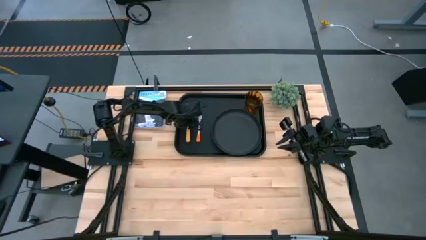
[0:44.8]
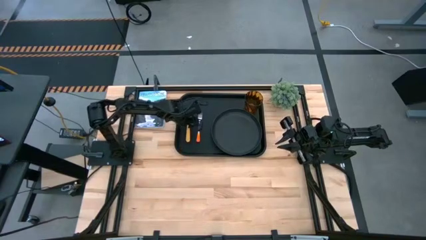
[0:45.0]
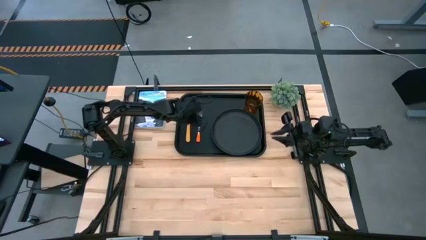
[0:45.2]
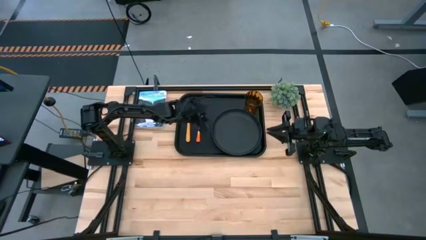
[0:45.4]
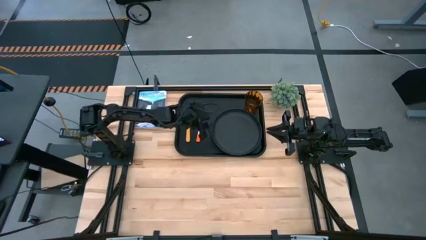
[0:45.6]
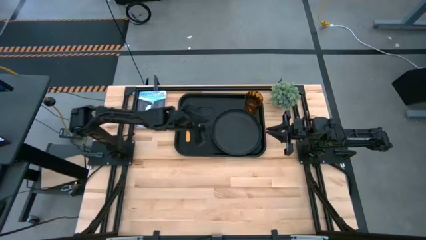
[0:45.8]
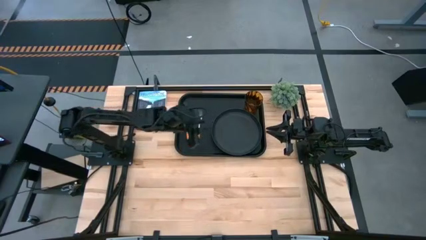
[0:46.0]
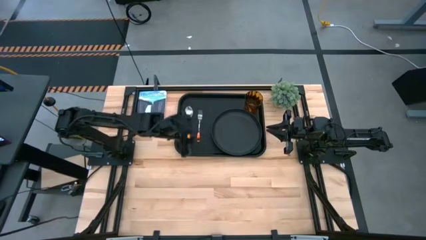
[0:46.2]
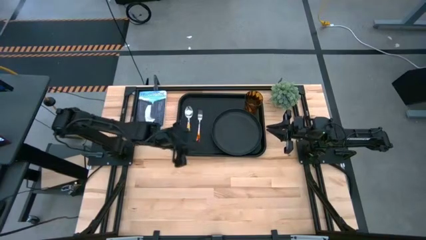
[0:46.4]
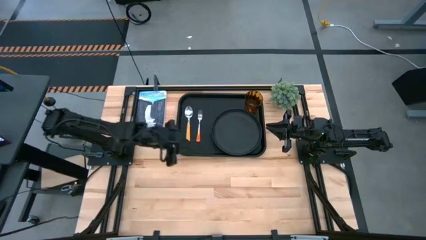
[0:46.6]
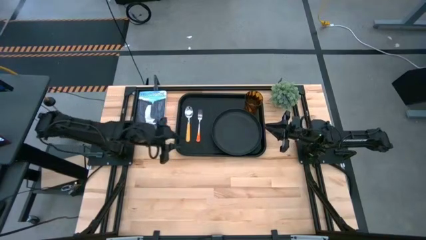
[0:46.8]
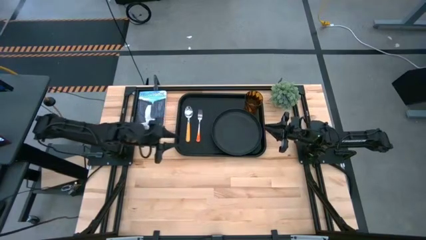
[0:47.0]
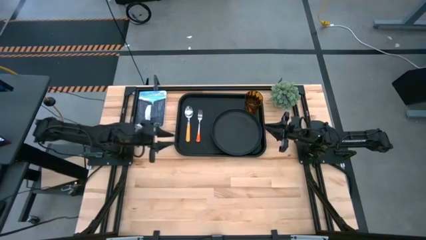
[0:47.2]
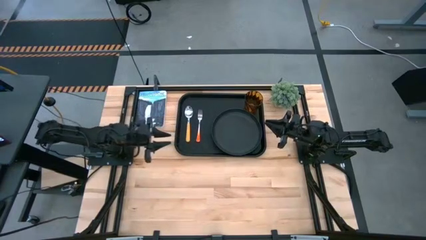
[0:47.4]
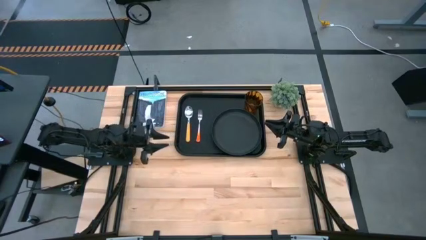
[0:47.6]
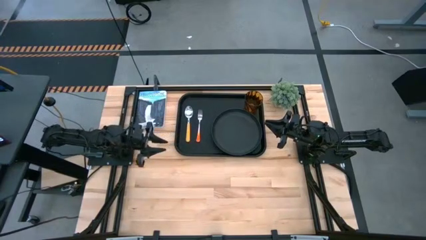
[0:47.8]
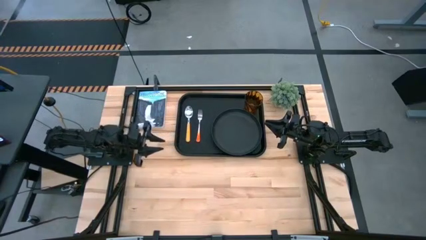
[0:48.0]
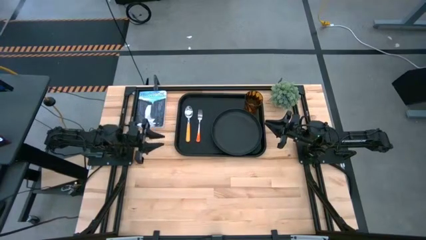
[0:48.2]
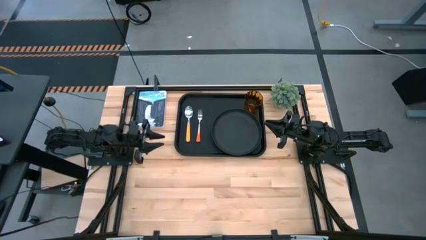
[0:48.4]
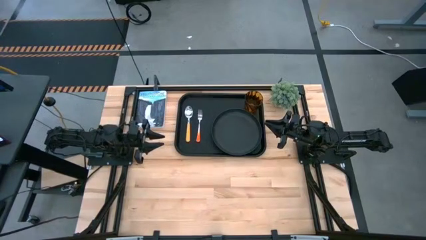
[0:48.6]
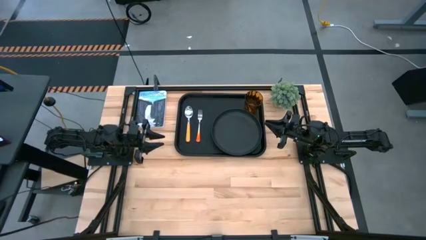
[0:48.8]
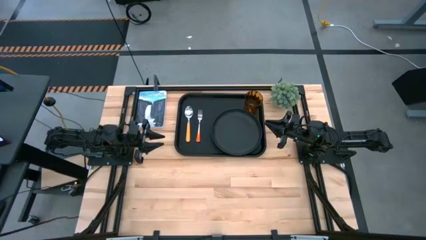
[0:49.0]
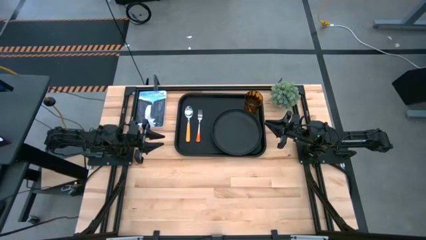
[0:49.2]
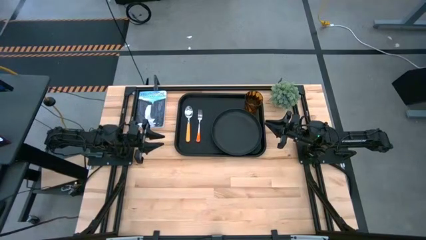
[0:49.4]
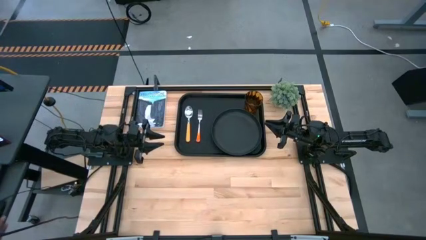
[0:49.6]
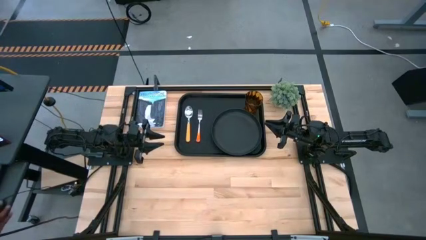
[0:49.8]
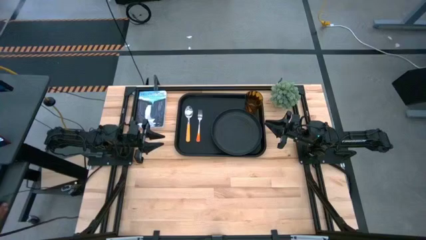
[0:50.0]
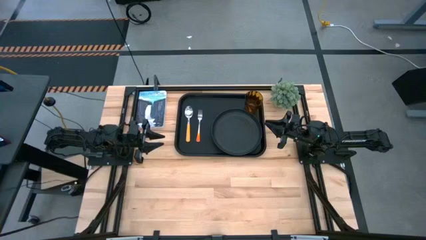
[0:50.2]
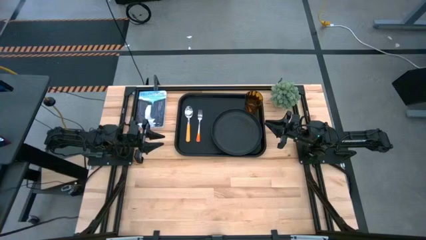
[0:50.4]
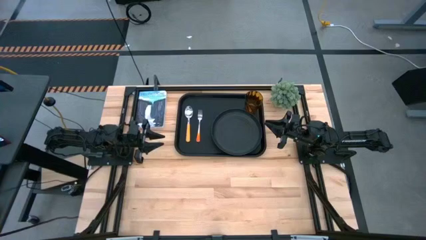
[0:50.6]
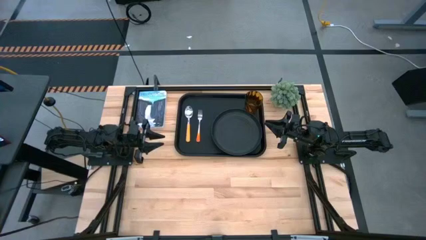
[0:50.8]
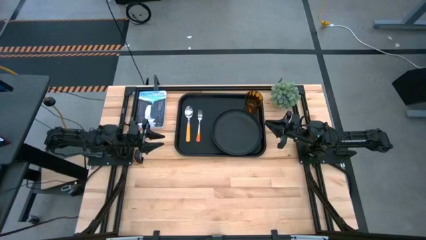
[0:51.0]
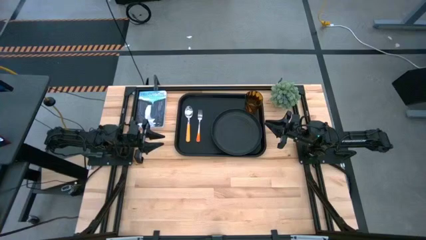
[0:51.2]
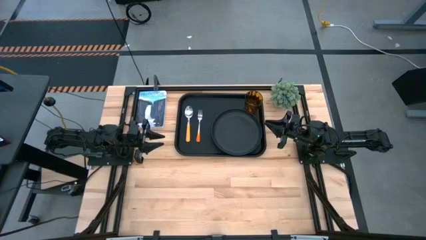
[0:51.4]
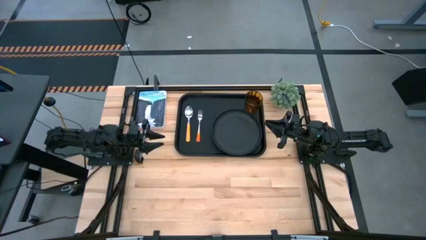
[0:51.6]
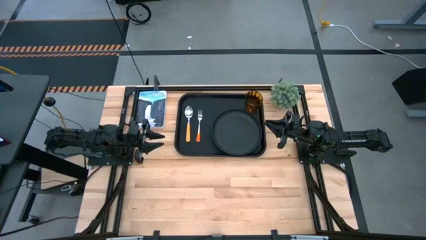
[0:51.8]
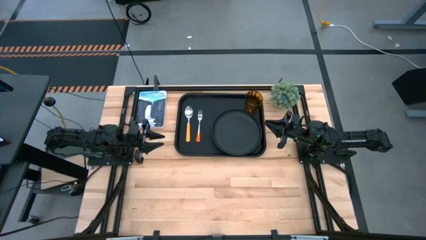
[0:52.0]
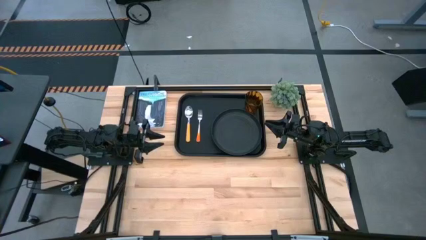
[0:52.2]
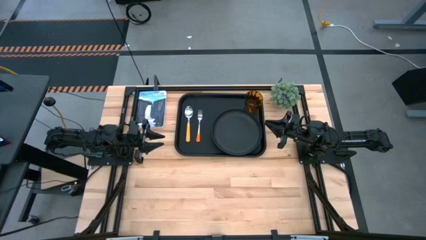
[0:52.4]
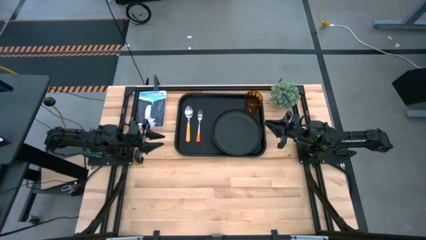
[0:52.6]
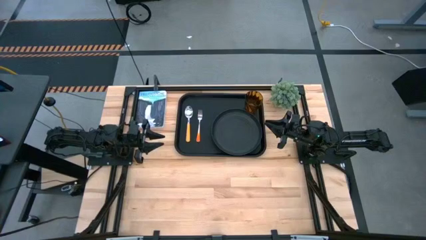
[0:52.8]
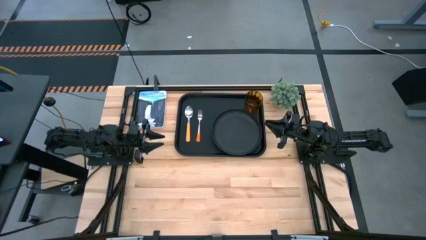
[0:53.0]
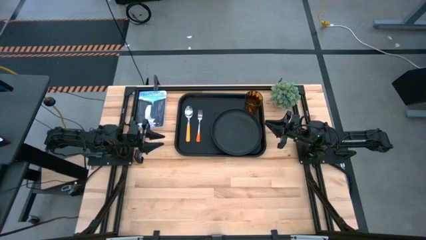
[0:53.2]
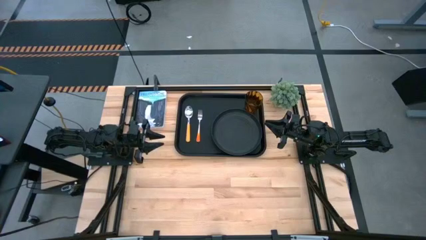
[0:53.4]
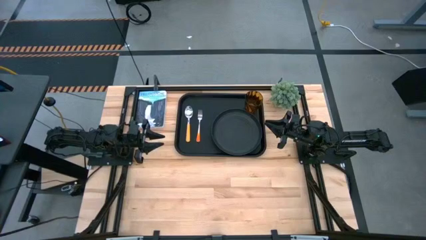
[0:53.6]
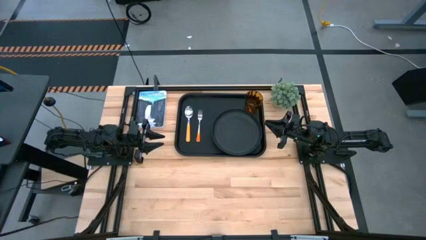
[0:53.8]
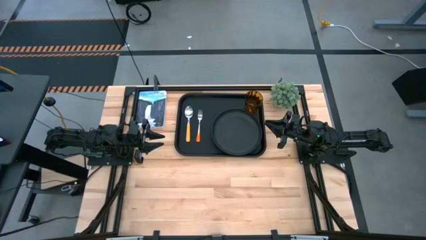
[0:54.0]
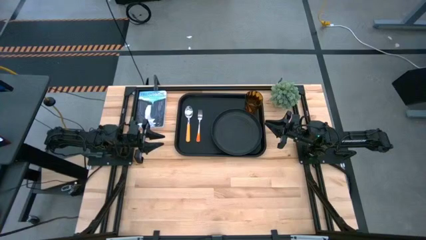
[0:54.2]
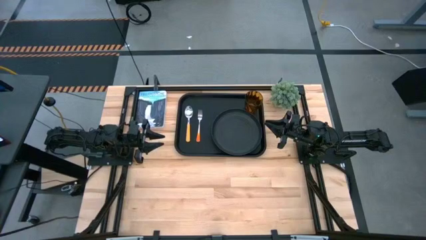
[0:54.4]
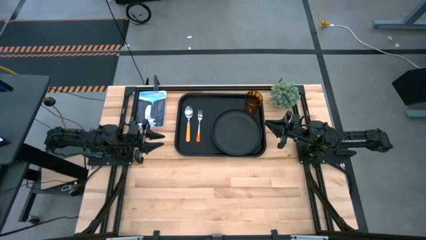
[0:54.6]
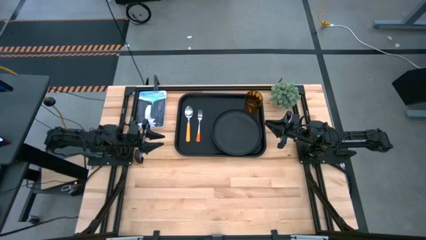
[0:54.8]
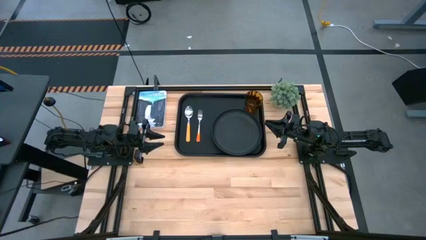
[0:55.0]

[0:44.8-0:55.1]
Task: Pick and place plate/cup/fork/spoon on tray
Return to Home Position
